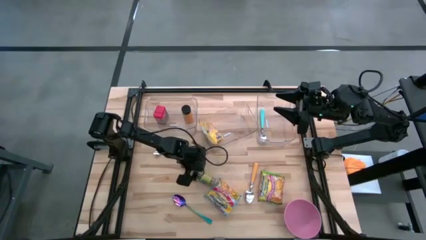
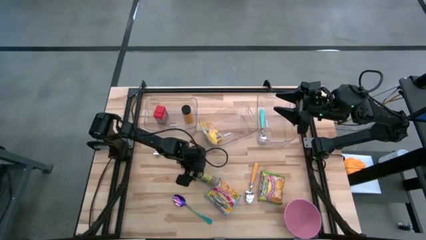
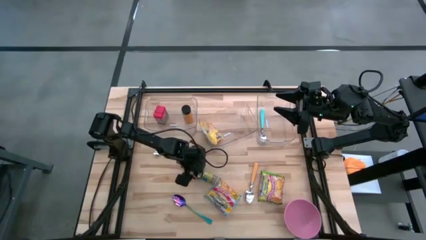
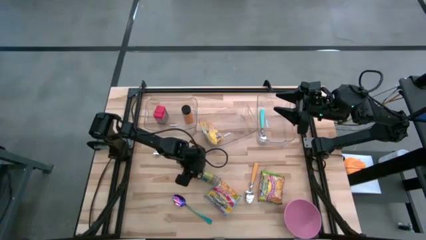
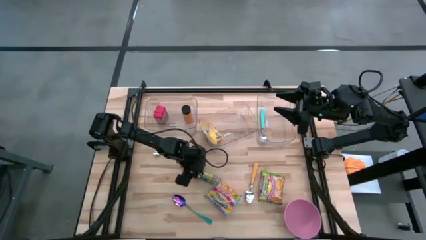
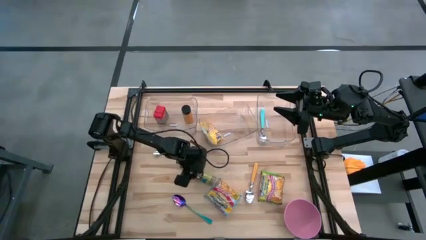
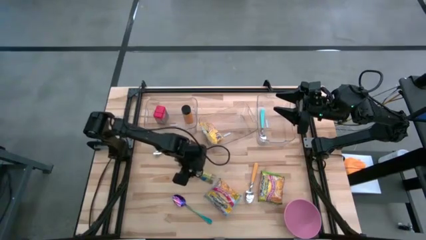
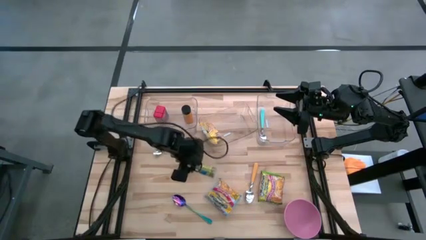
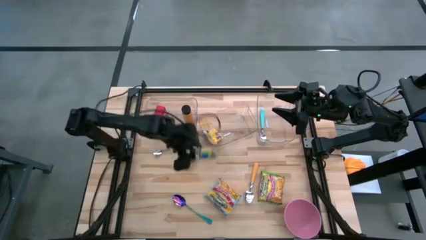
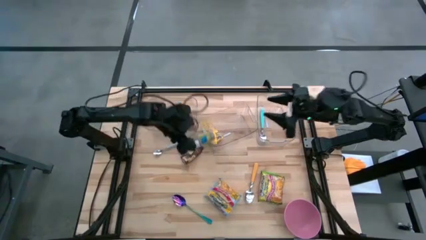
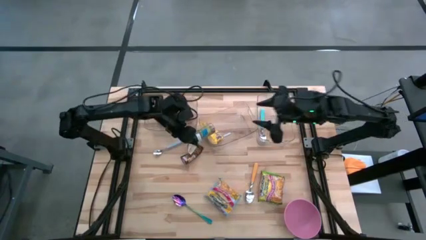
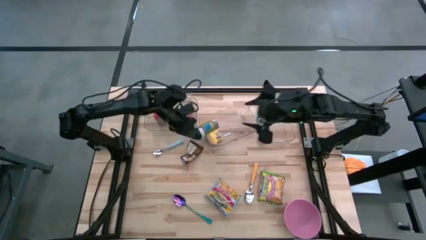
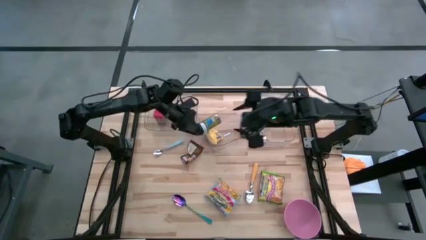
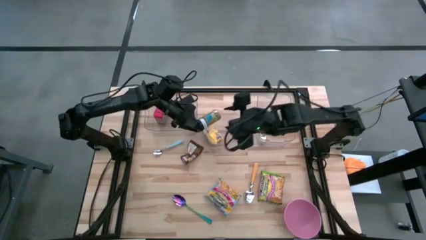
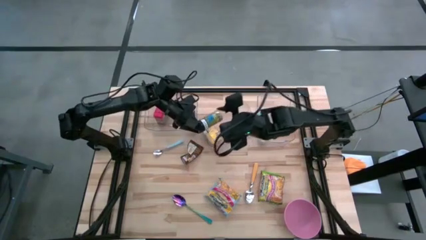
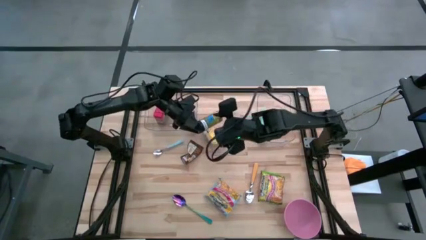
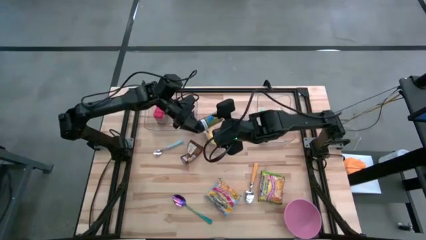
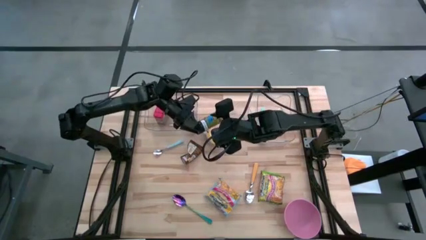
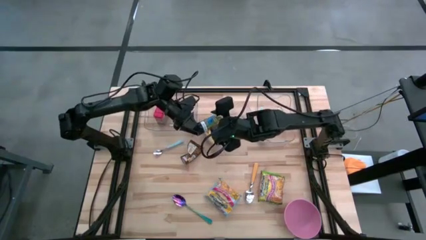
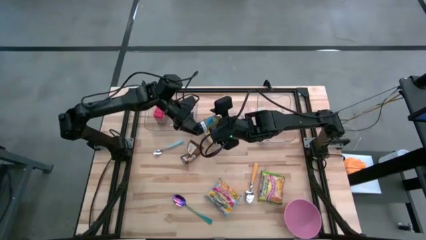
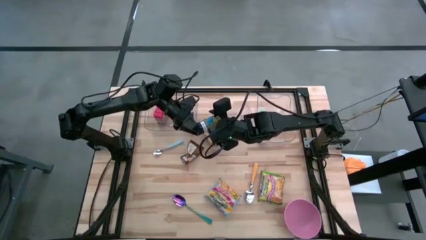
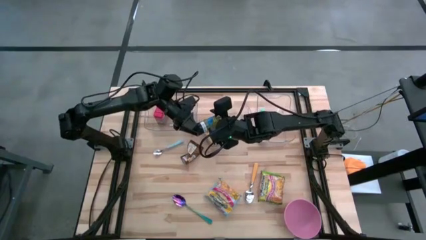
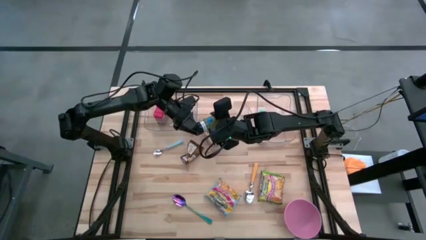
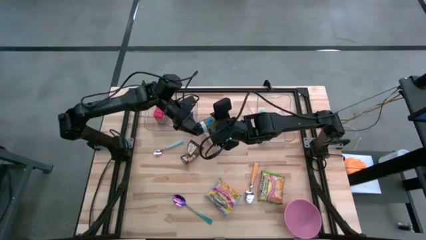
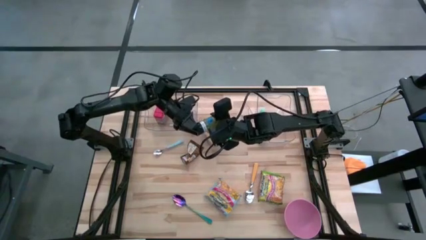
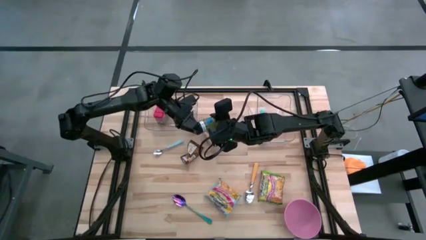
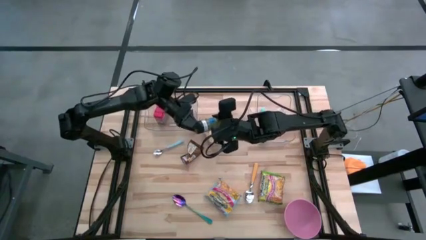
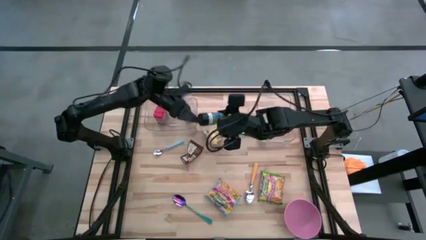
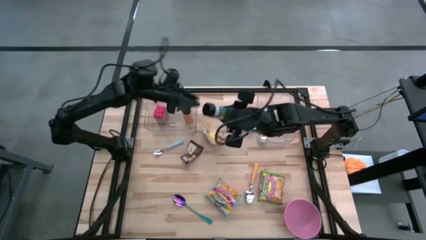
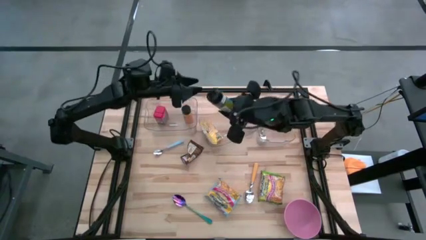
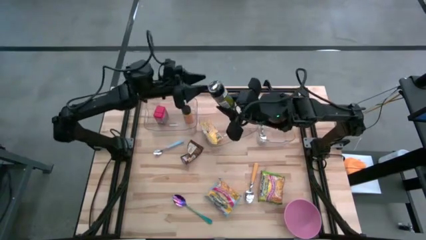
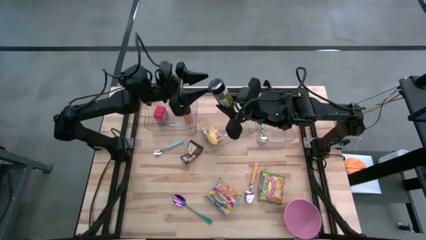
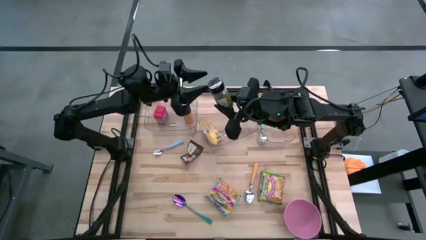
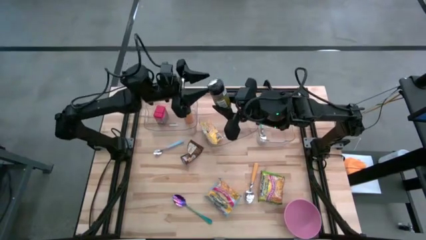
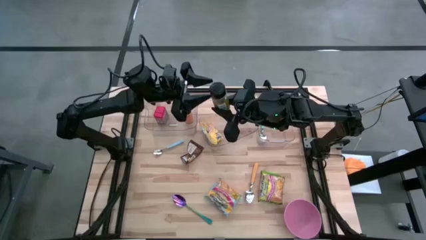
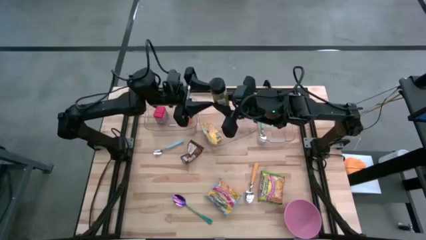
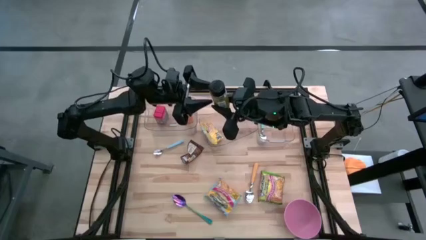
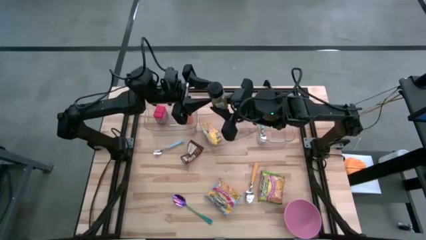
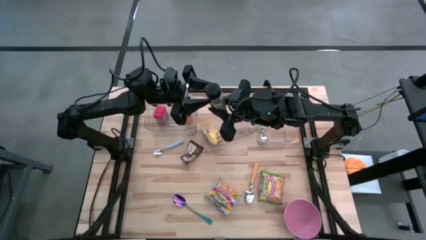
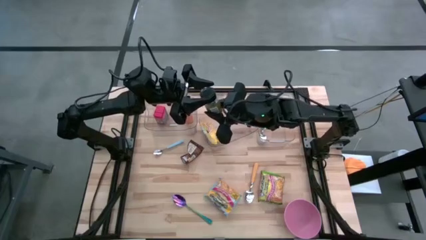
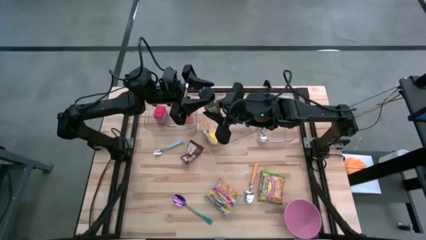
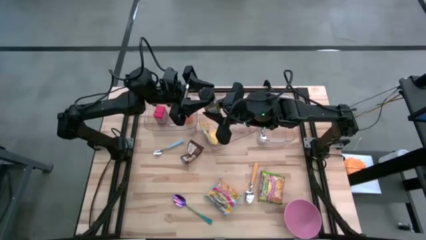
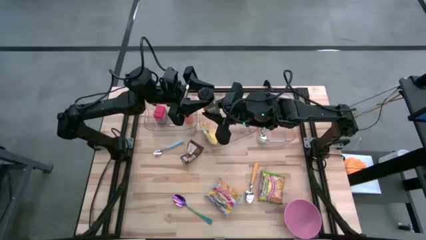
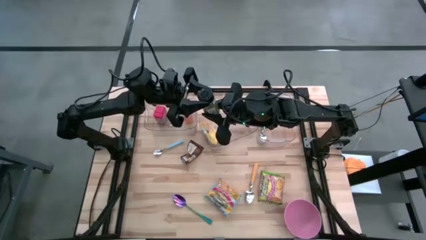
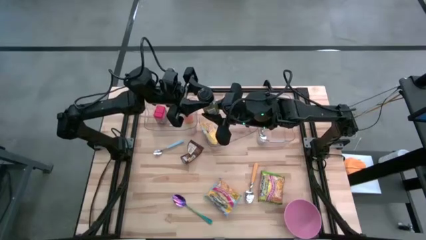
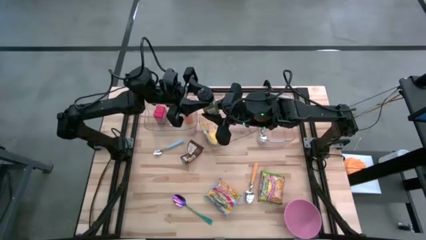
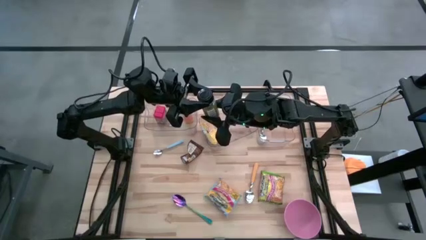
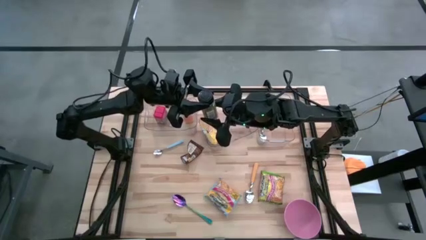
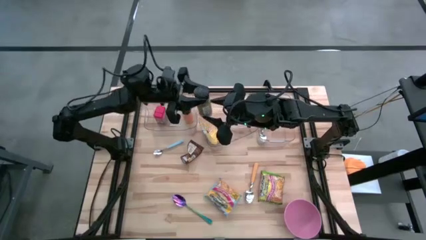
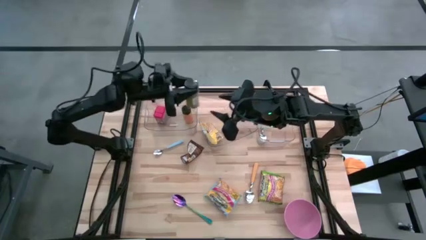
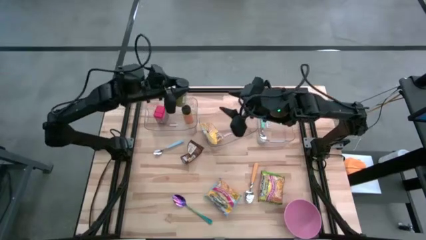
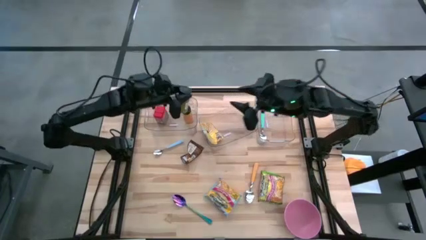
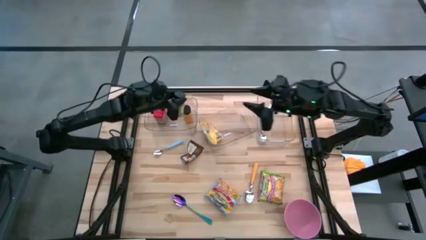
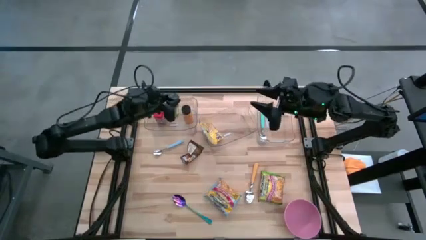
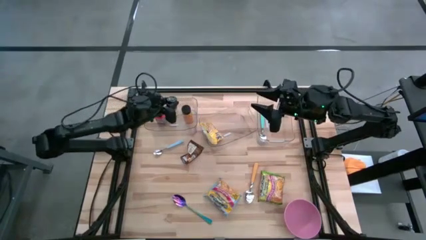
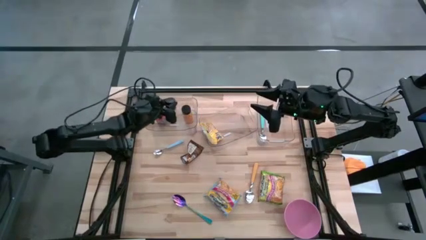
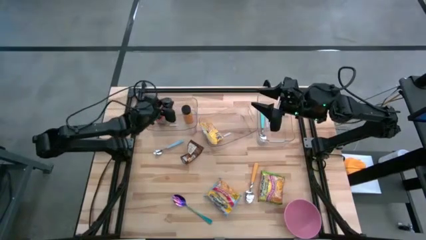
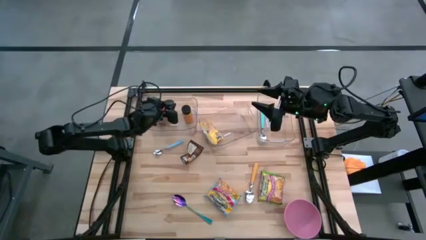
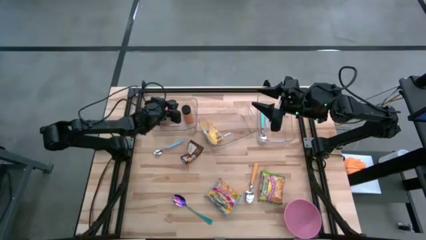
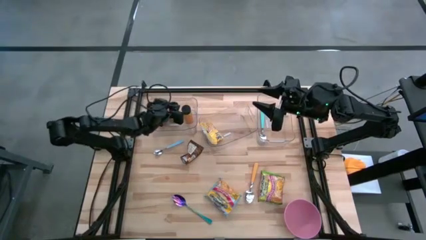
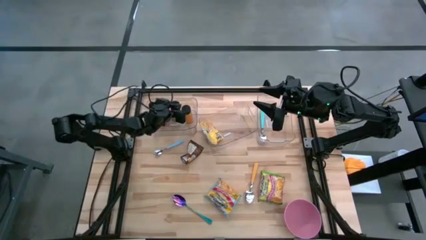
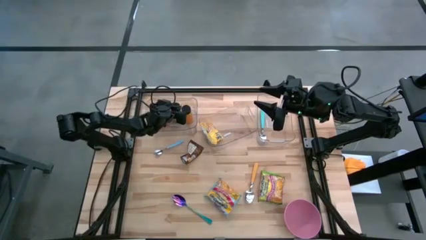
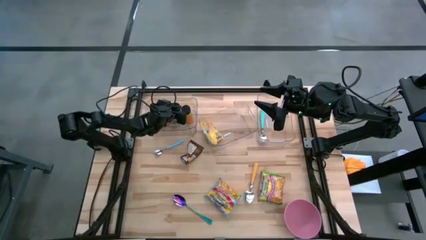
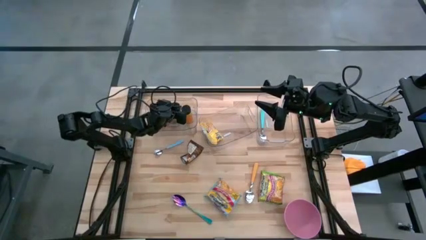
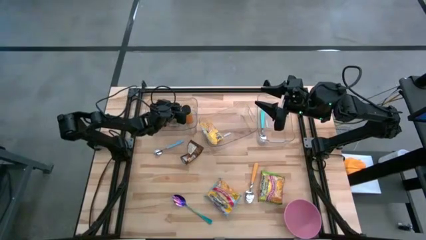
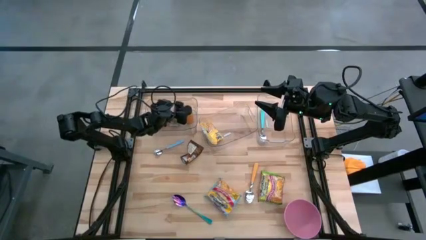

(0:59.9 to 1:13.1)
Task: Pick & Place Food Item
Put the green seasoning bottle into the left transparent bin

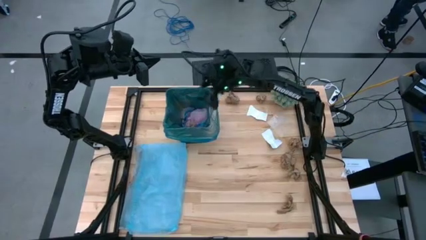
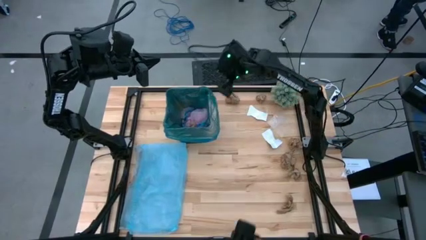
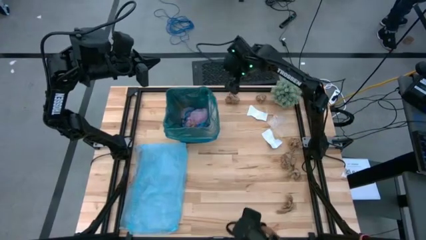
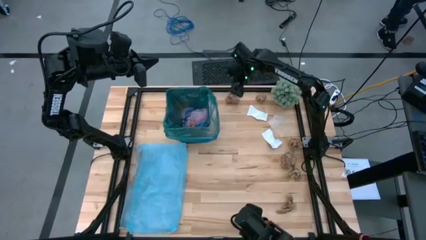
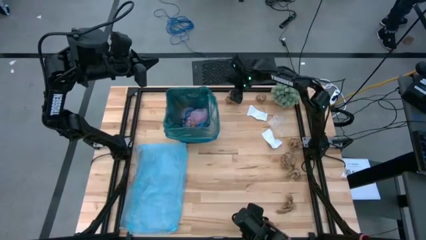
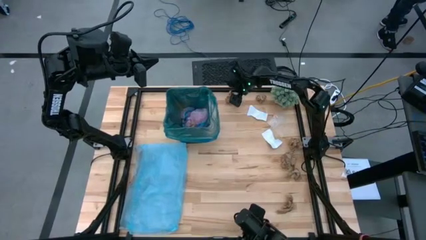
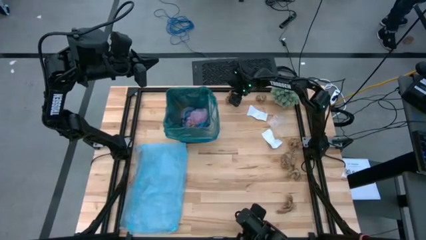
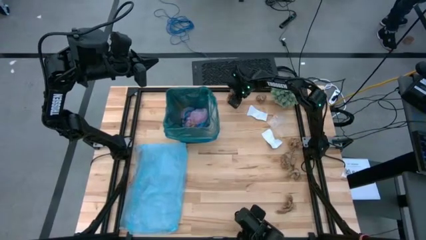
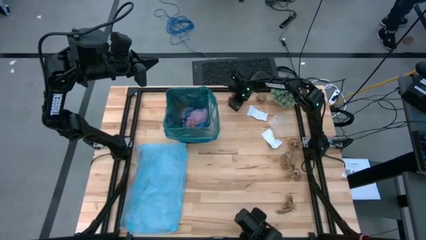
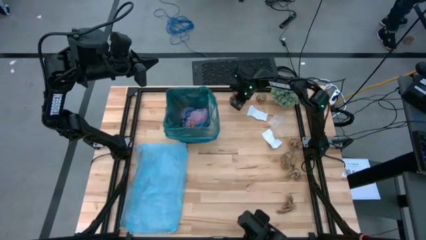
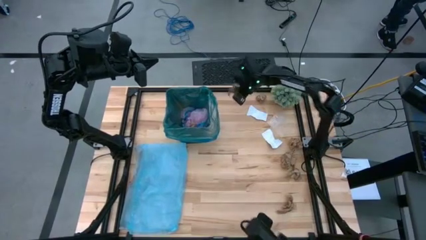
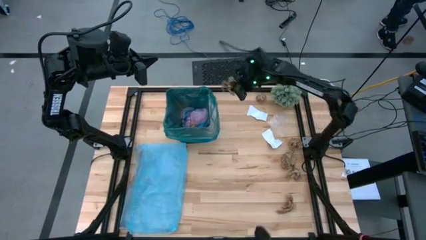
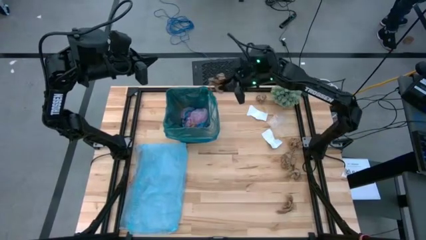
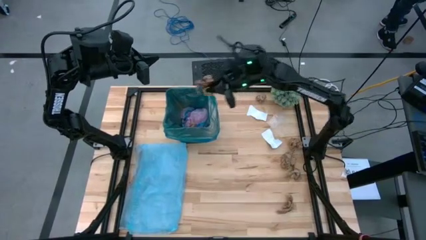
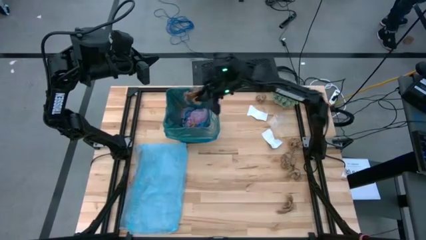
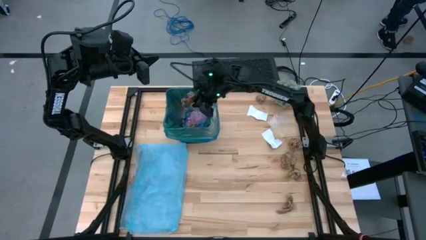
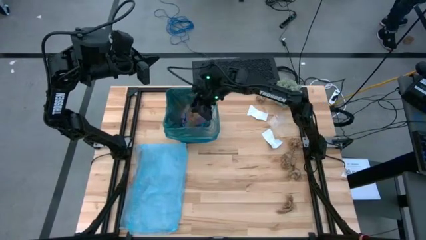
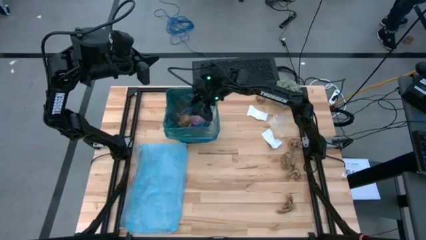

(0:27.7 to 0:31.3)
Task: place trash/remove bag and relplace
Put the brown napkin into the trash bin
